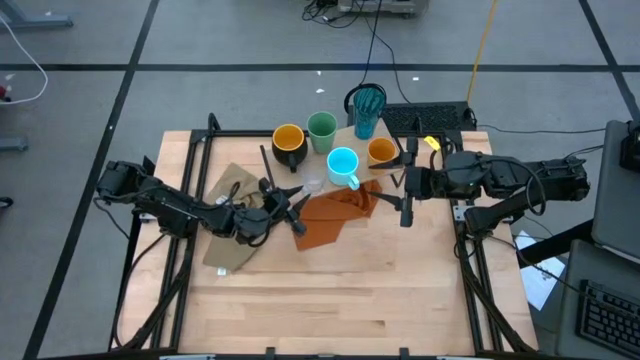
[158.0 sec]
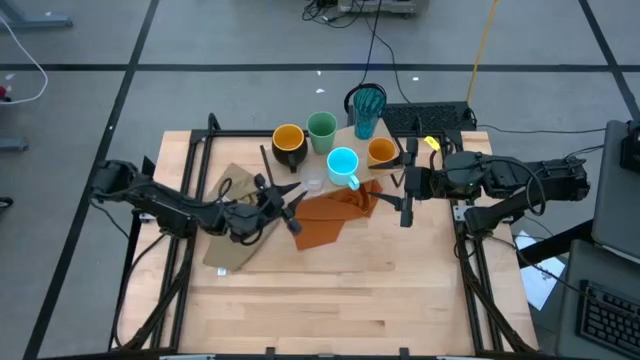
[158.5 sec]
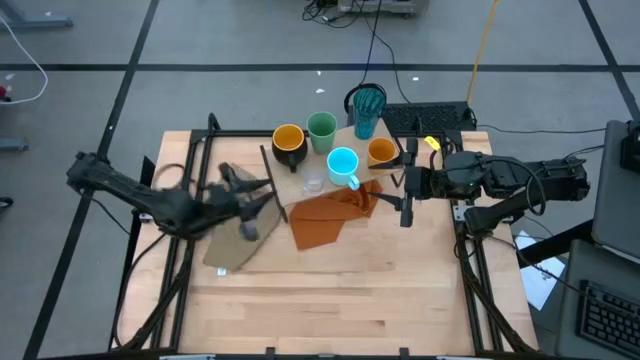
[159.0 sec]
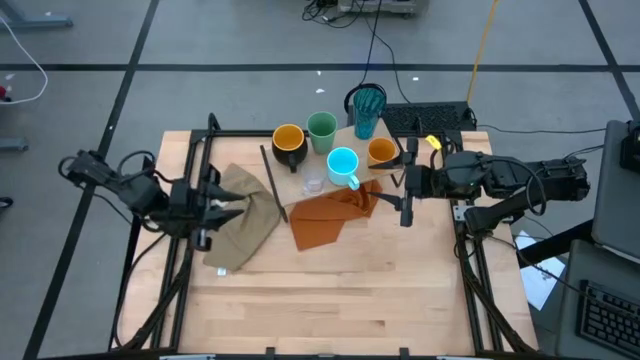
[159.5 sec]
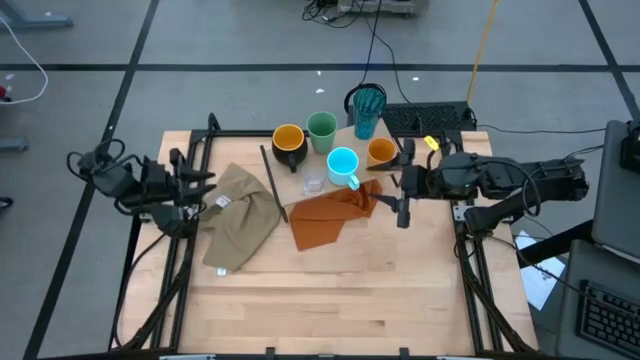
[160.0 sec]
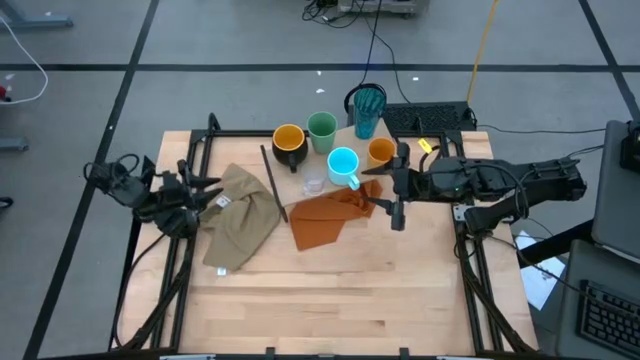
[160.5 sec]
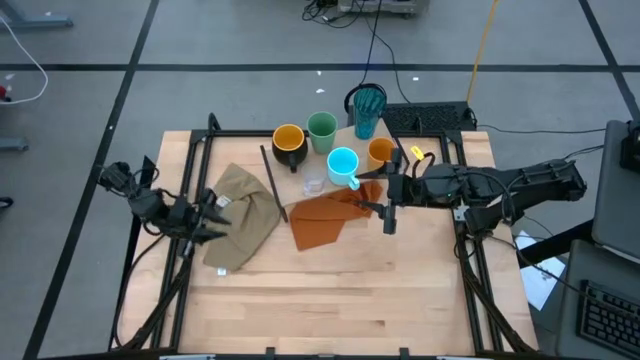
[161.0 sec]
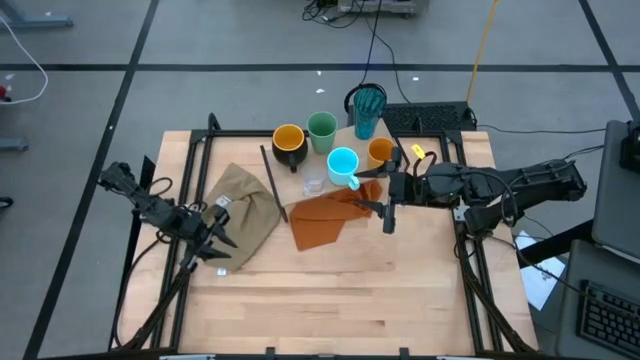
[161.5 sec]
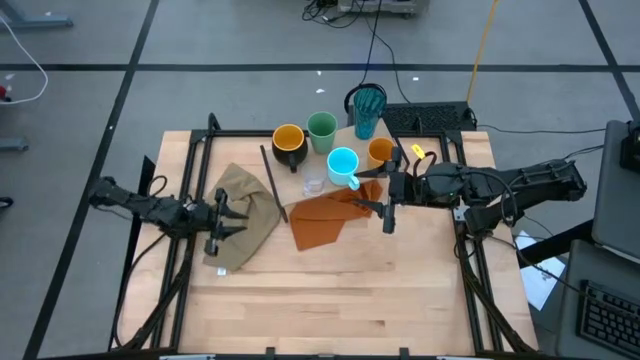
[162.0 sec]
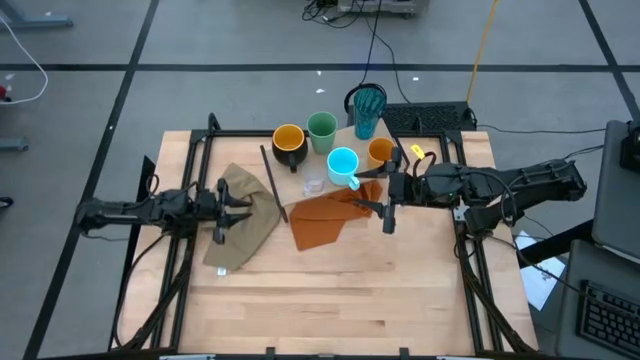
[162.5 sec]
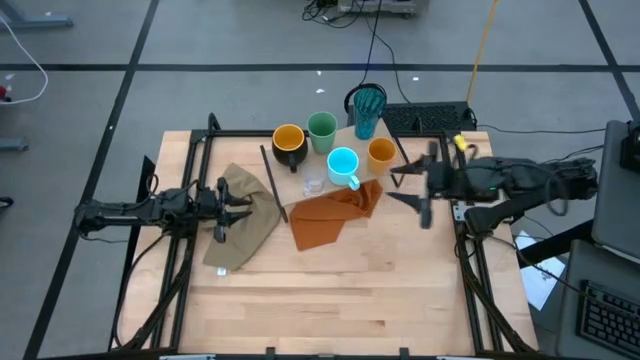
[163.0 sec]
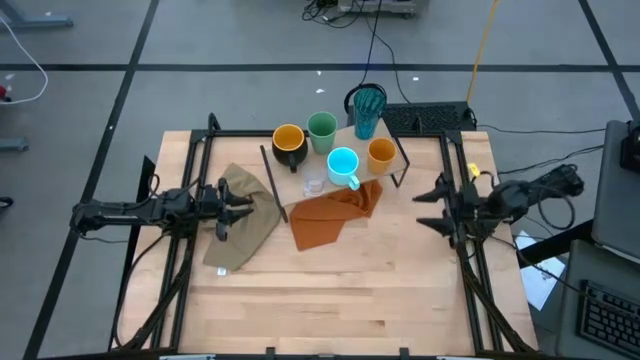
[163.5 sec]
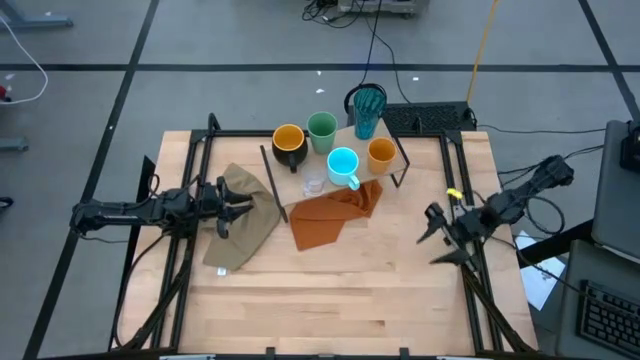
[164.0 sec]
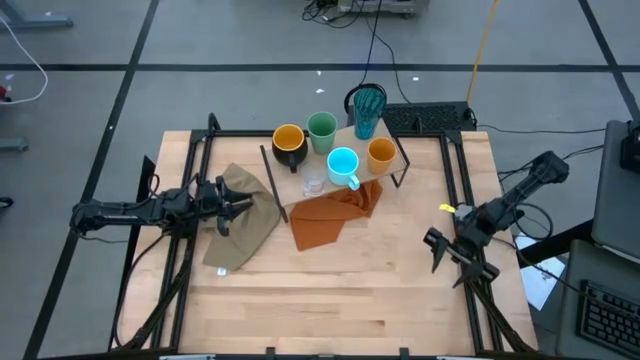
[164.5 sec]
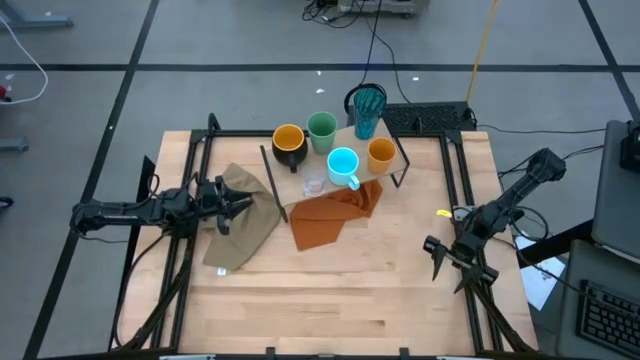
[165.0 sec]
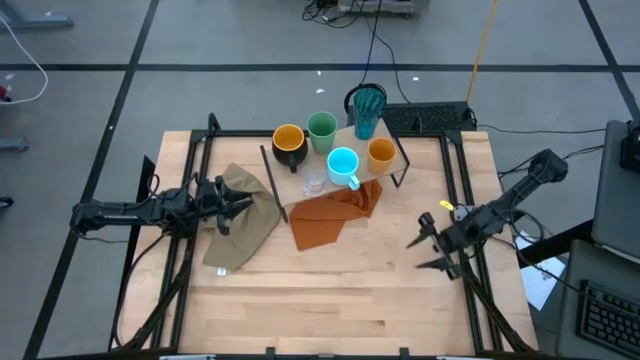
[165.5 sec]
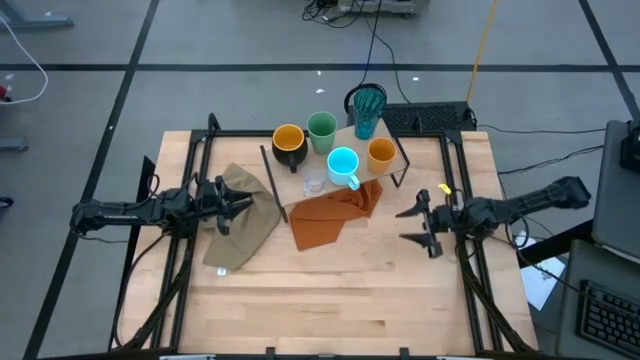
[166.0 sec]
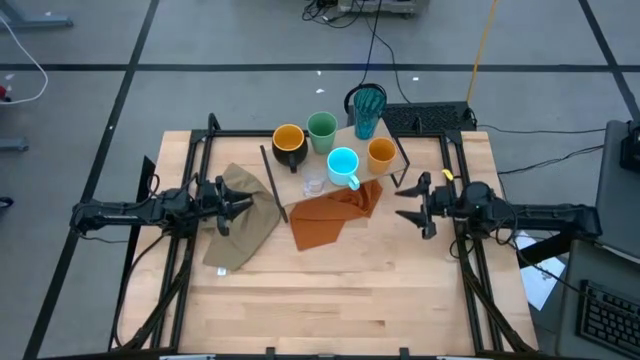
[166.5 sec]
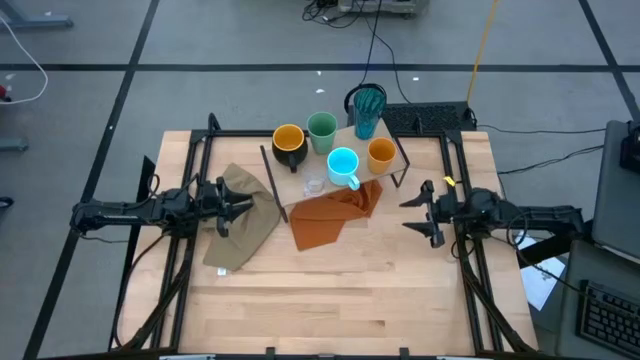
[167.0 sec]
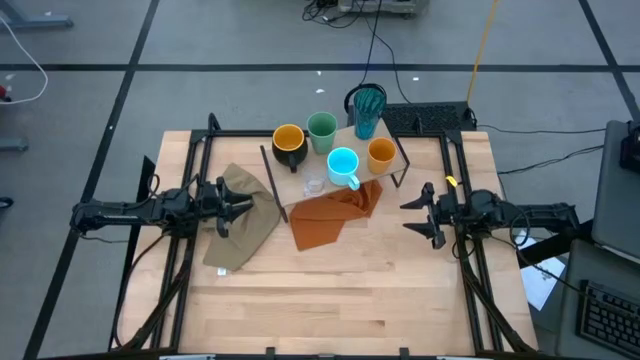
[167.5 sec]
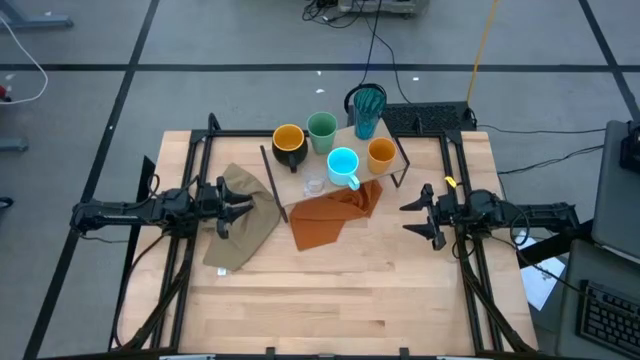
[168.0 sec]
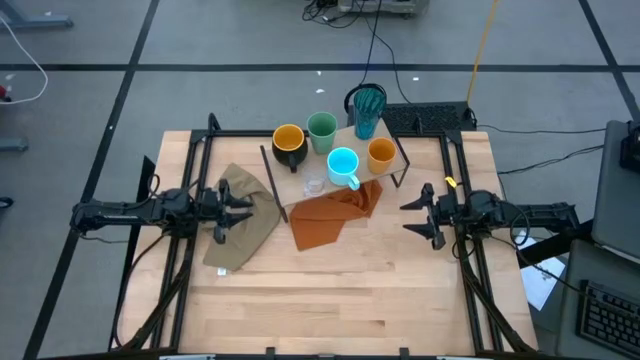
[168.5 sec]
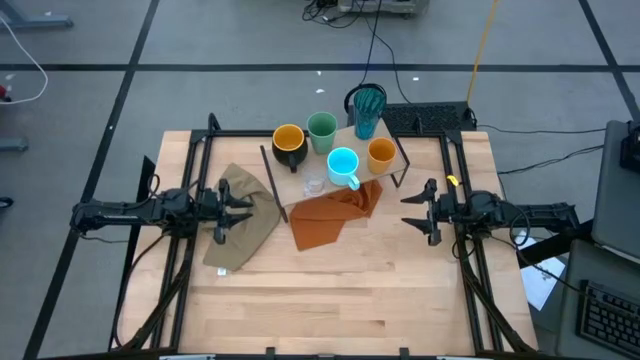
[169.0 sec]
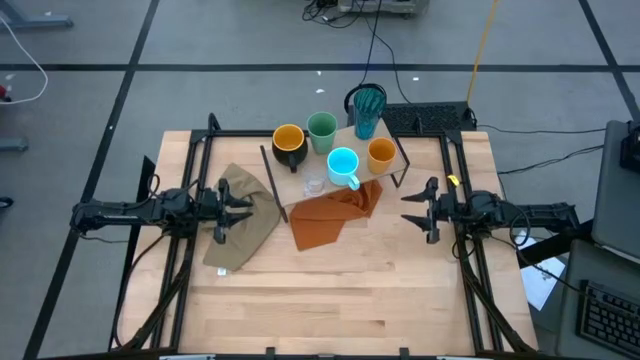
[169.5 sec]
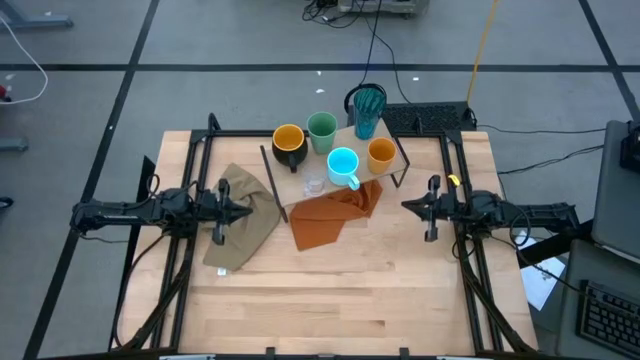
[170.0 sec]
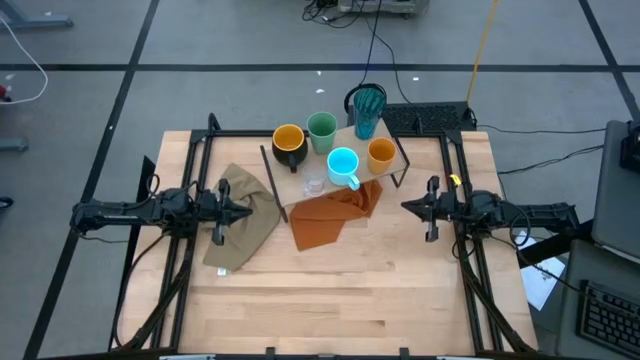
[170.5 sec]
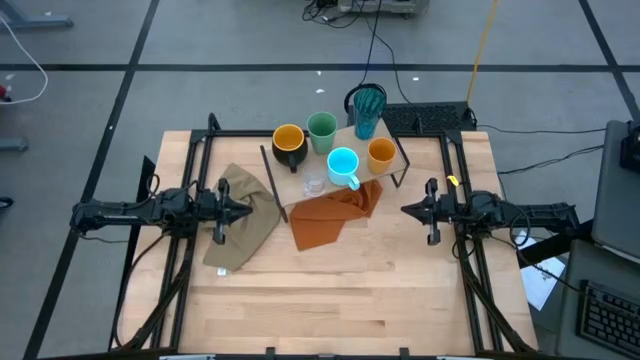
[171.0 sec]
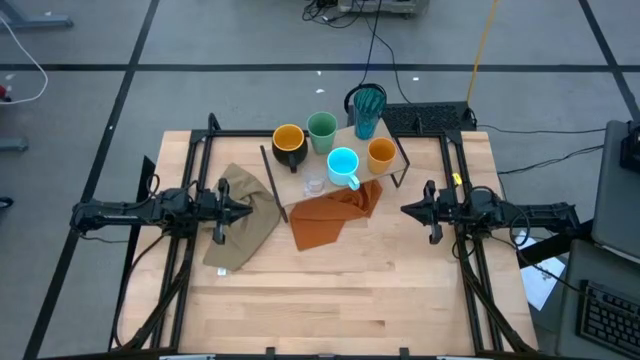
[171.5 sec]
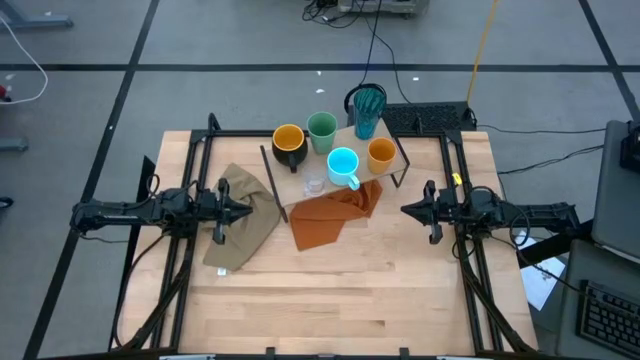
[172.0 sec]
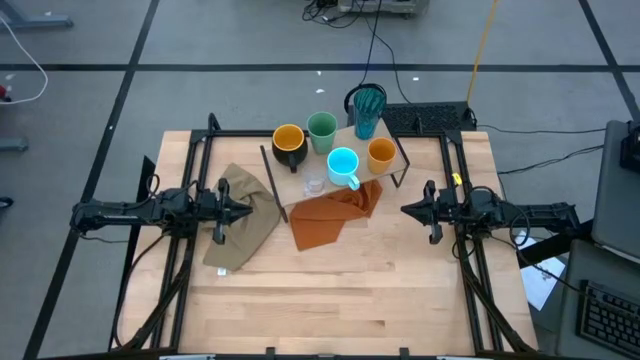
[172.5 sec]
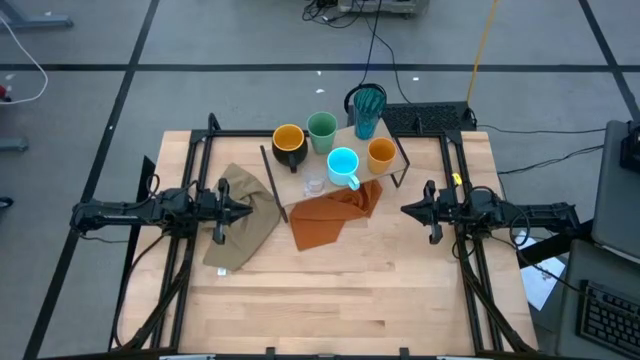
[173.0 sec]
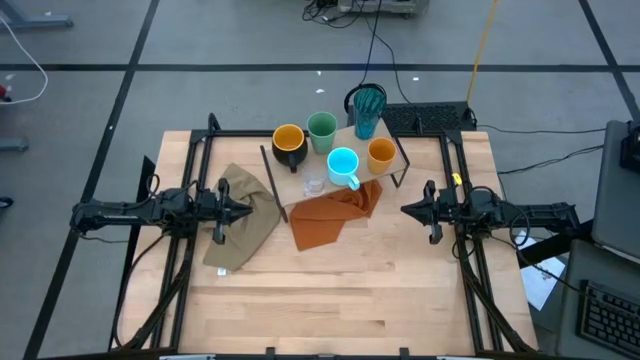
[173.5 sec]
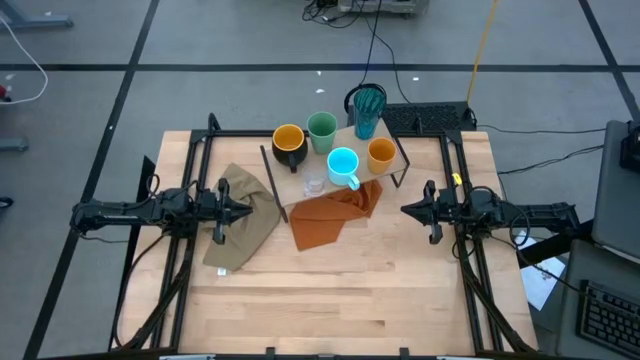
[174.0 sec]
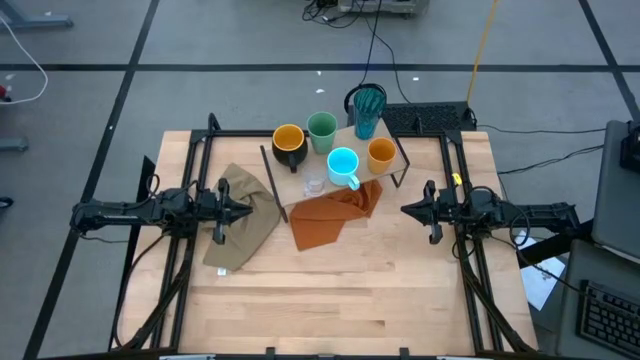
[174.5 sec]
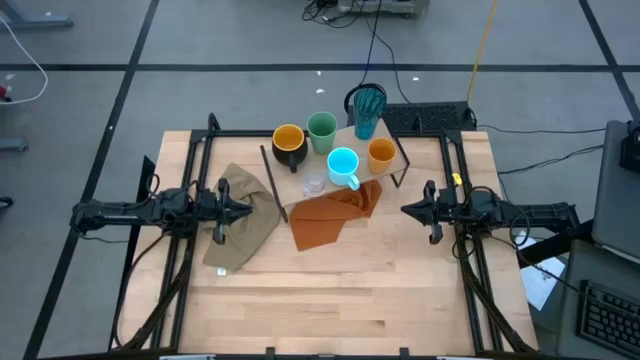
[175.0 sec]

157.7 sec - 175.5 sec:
Task: Stack small to large cups/mugs on shelf
Return to Home Position

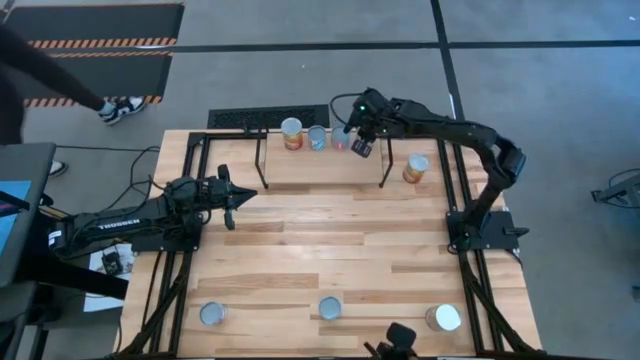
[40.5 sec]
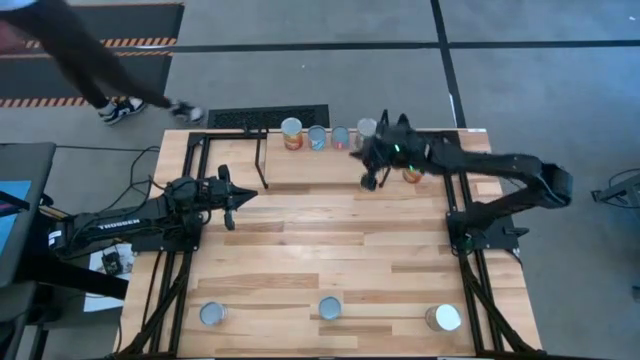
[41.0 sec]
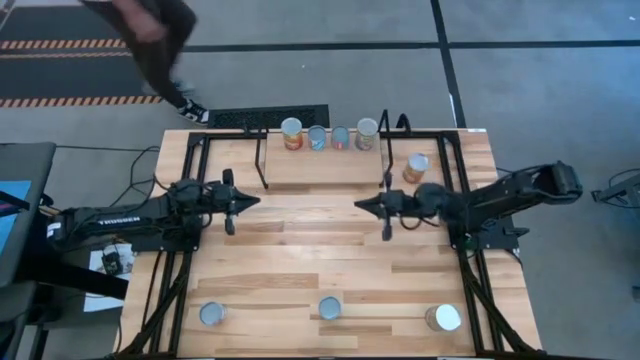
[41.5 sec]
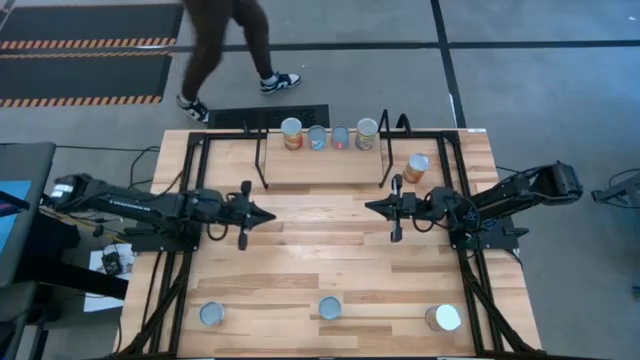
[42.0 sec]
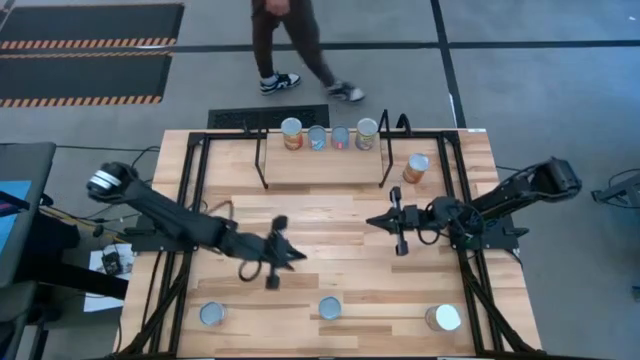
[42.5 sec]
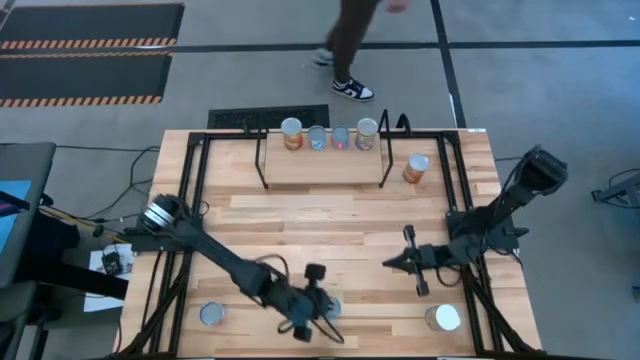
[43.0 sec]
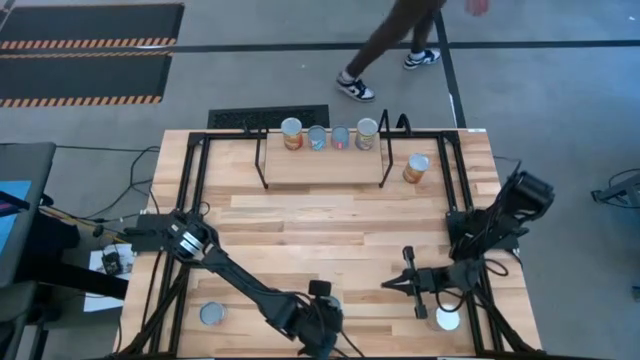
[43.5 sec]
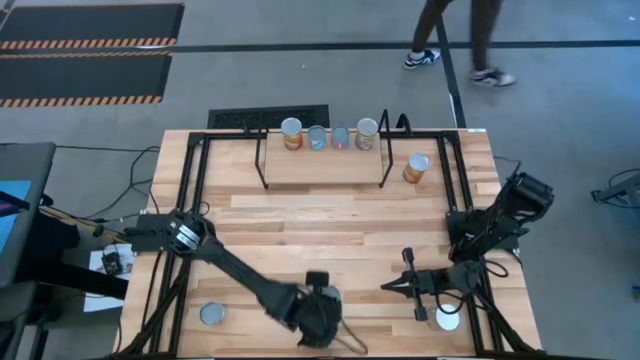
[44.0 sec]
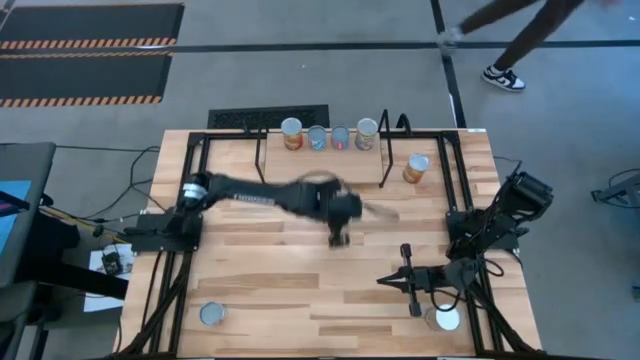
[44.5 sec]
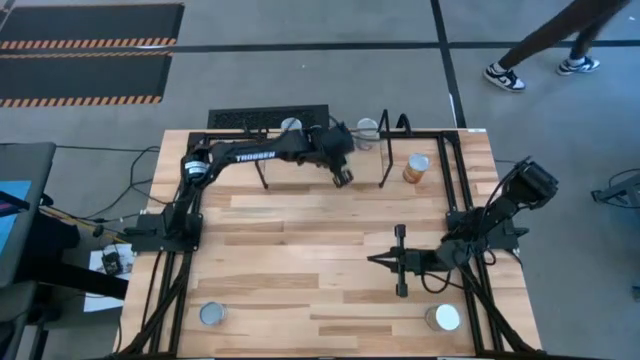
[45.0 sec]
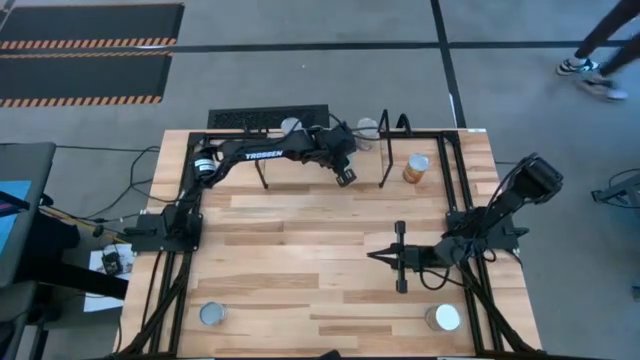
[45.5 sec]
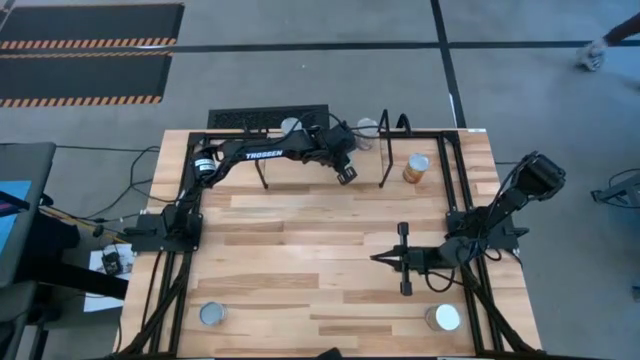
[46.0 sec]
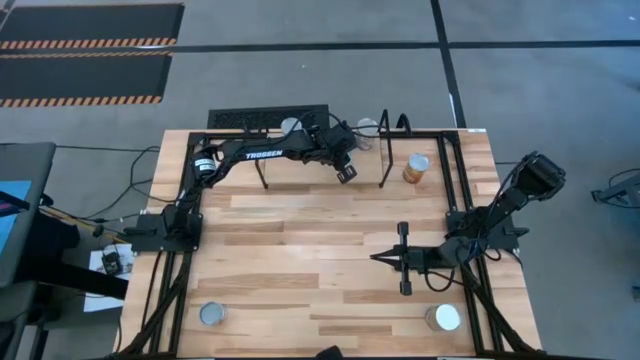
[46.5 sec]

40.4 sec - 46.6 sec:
Task: Pick and place cans onto a shelf
Put the canned green peas on the shelf
